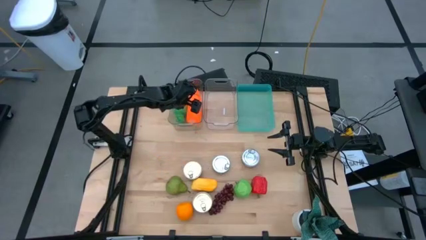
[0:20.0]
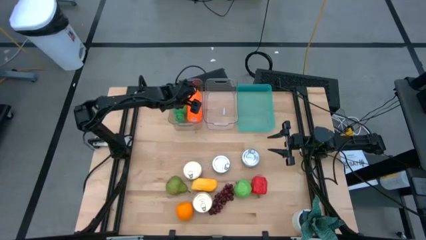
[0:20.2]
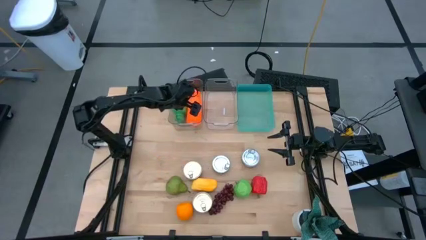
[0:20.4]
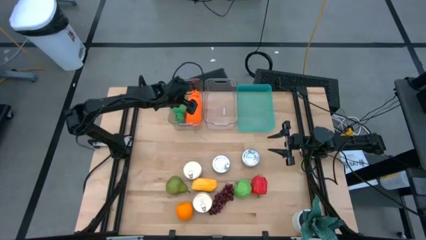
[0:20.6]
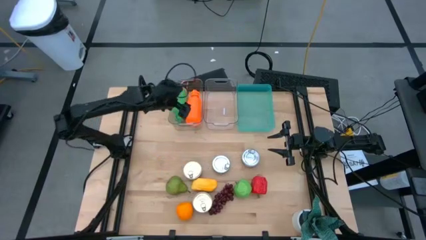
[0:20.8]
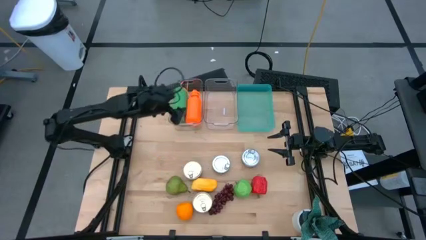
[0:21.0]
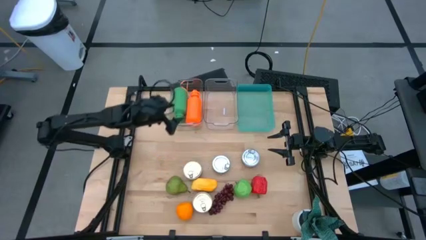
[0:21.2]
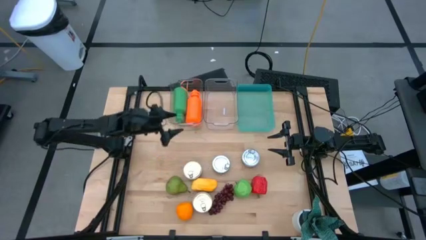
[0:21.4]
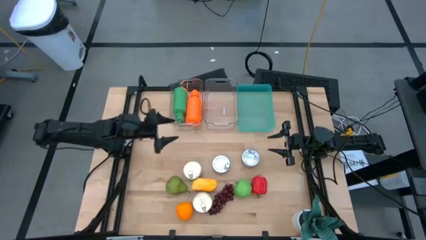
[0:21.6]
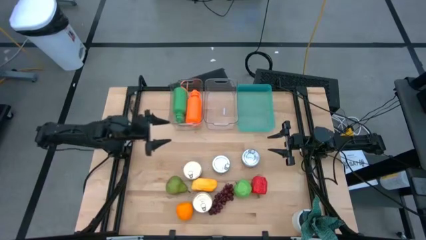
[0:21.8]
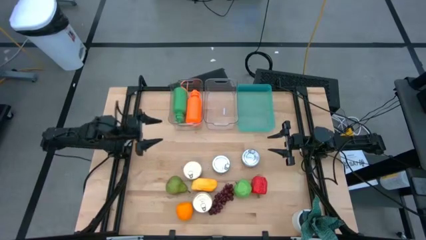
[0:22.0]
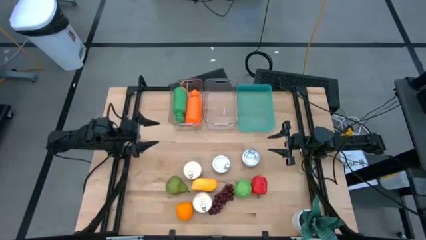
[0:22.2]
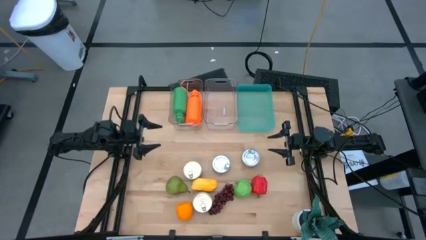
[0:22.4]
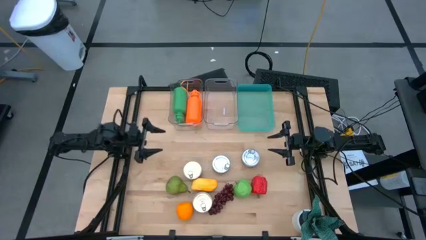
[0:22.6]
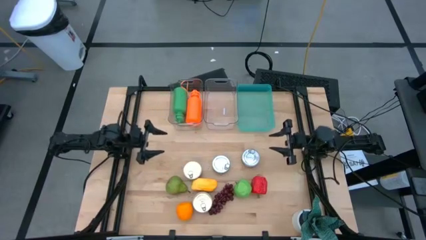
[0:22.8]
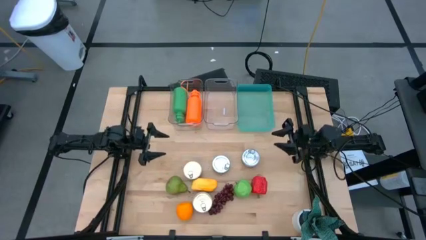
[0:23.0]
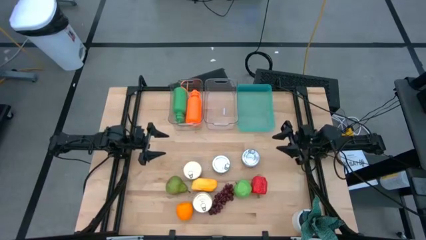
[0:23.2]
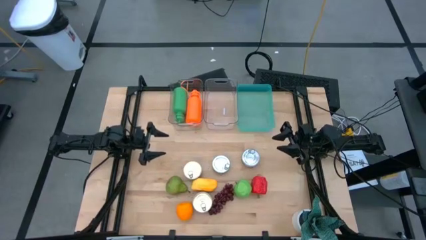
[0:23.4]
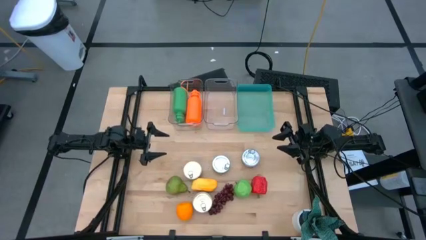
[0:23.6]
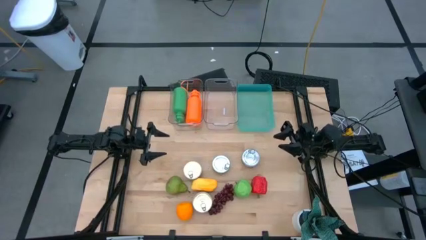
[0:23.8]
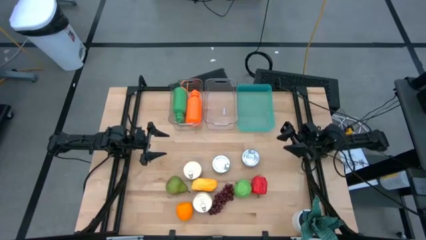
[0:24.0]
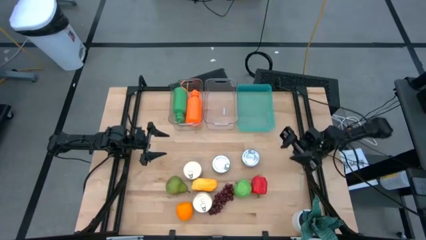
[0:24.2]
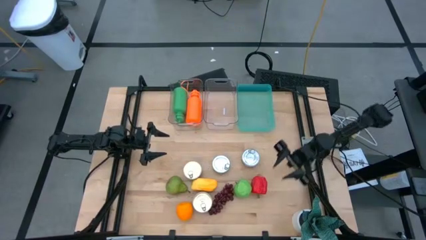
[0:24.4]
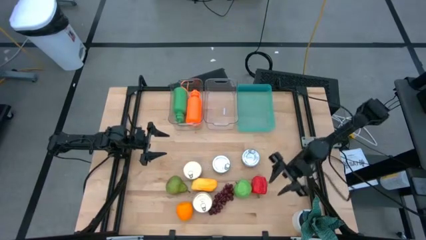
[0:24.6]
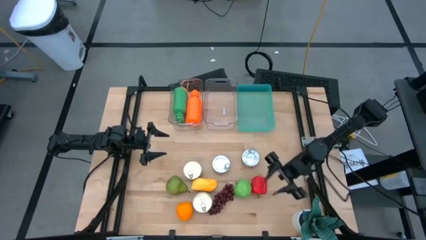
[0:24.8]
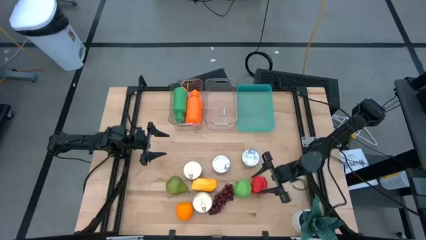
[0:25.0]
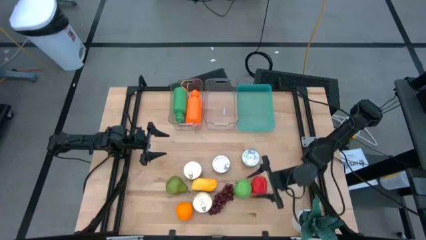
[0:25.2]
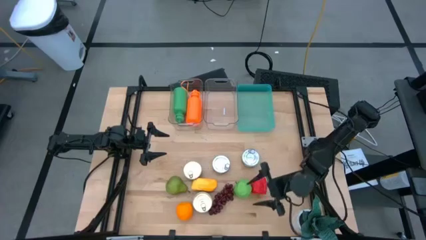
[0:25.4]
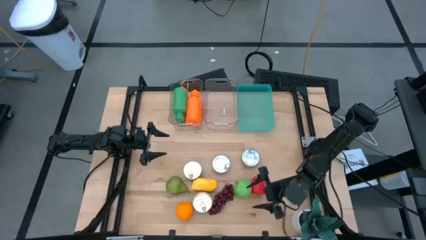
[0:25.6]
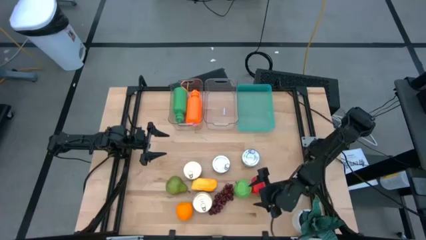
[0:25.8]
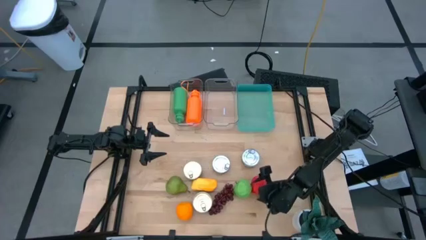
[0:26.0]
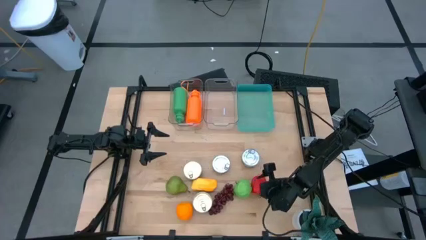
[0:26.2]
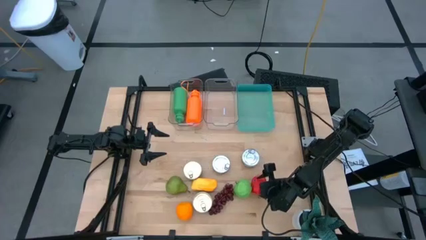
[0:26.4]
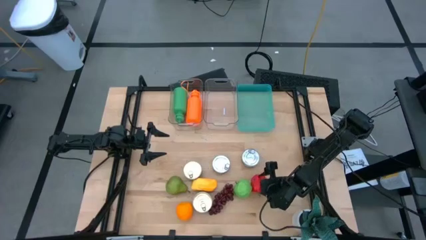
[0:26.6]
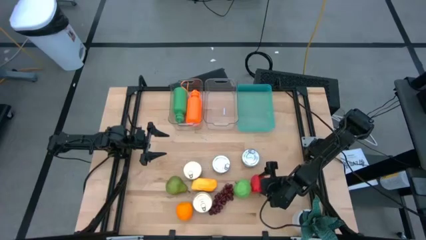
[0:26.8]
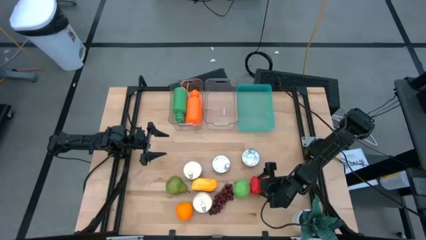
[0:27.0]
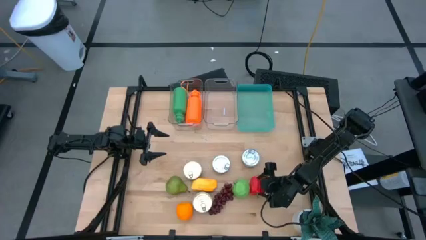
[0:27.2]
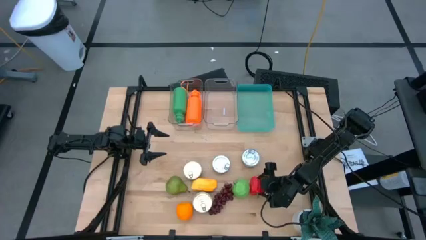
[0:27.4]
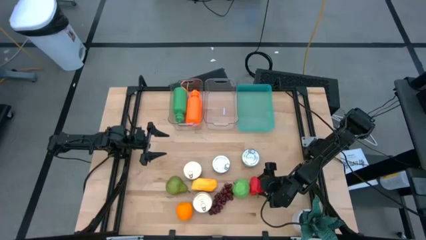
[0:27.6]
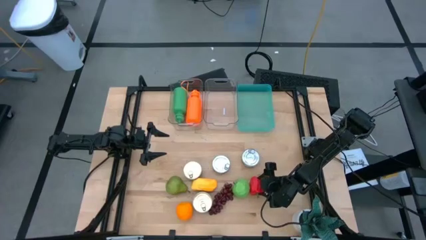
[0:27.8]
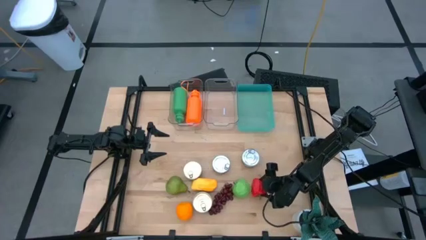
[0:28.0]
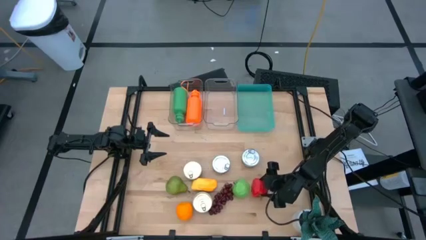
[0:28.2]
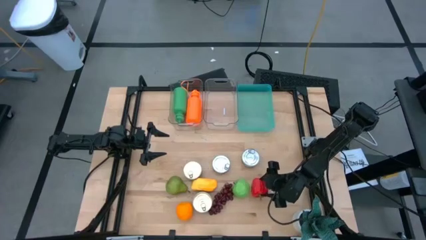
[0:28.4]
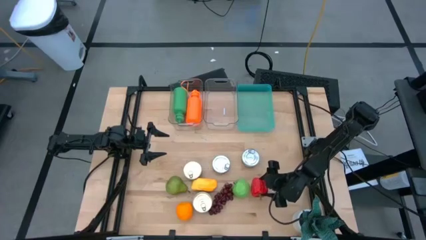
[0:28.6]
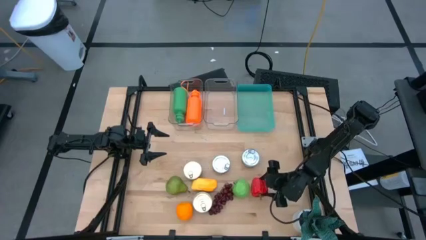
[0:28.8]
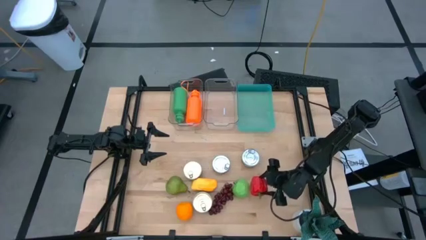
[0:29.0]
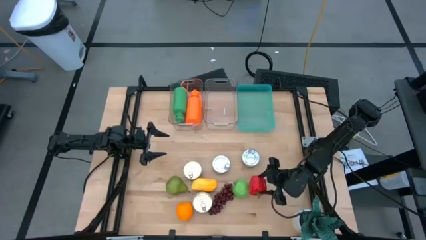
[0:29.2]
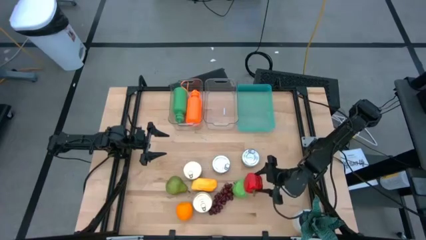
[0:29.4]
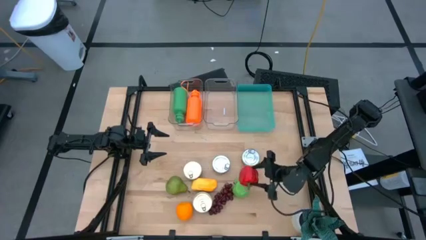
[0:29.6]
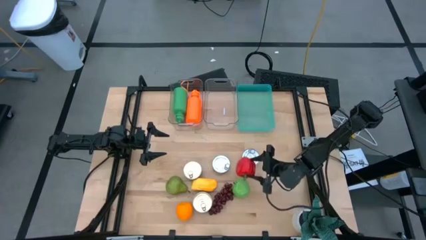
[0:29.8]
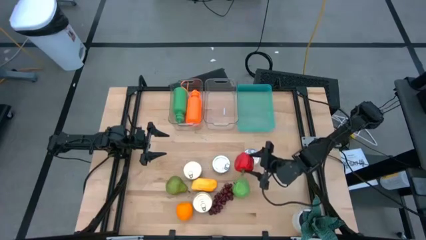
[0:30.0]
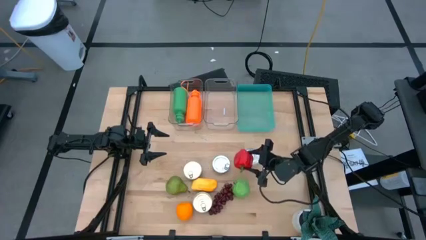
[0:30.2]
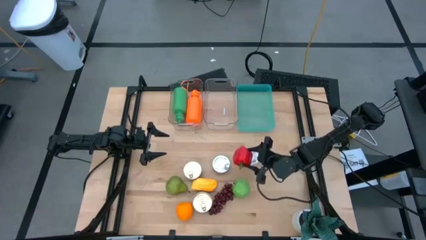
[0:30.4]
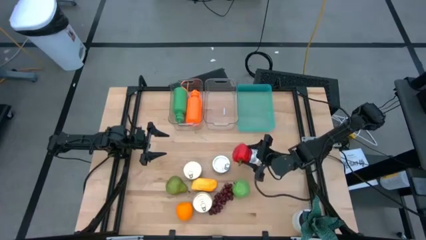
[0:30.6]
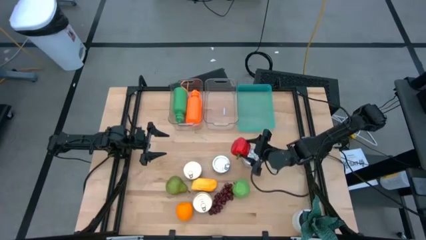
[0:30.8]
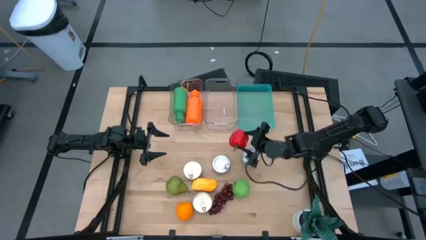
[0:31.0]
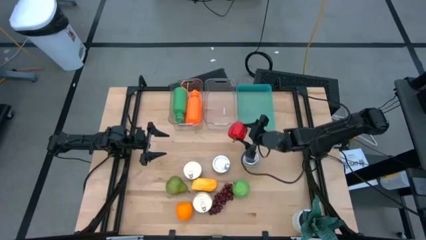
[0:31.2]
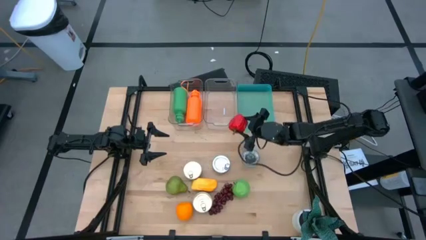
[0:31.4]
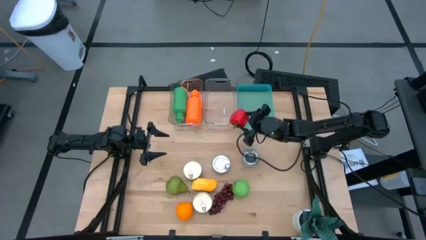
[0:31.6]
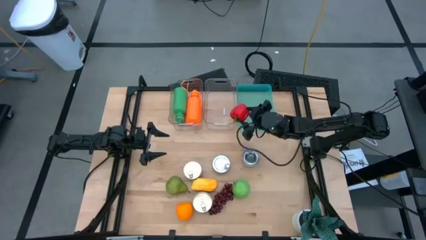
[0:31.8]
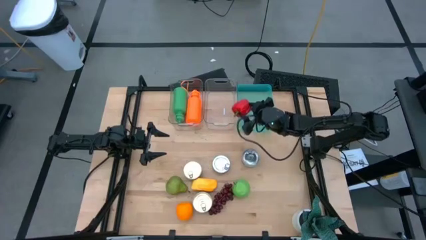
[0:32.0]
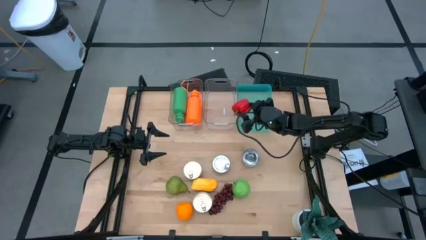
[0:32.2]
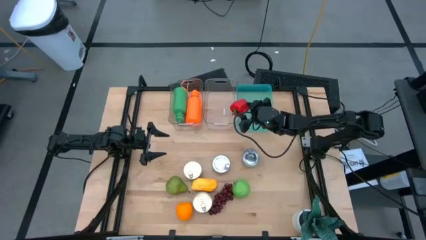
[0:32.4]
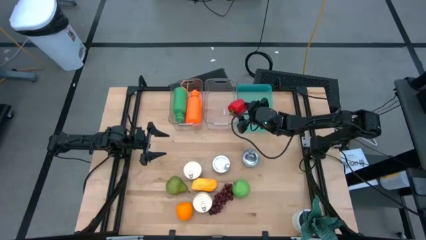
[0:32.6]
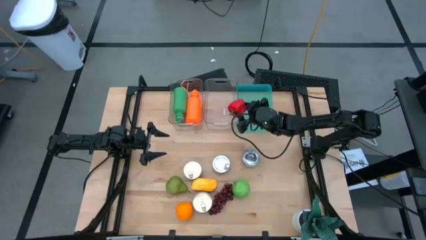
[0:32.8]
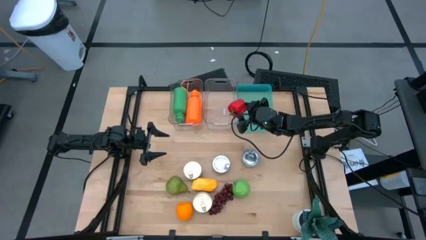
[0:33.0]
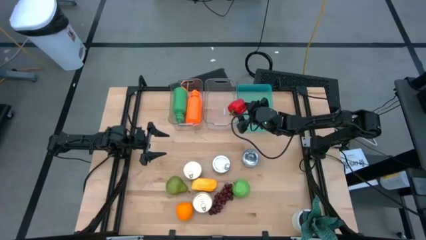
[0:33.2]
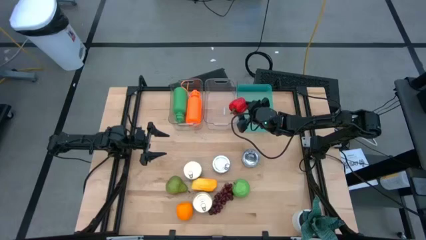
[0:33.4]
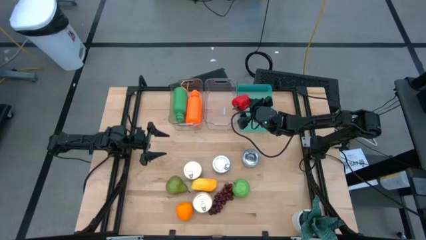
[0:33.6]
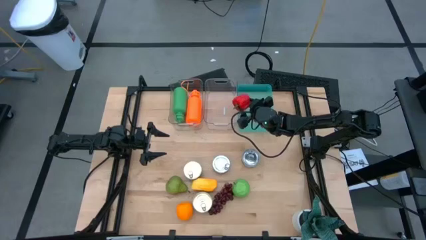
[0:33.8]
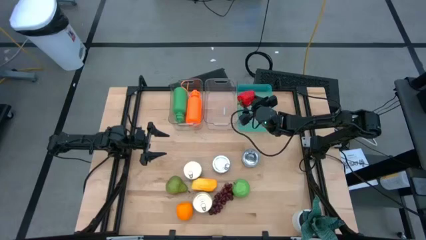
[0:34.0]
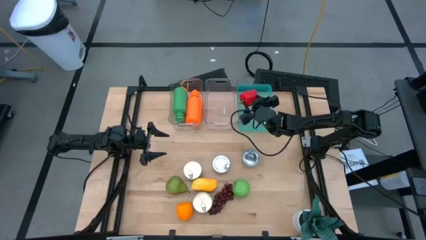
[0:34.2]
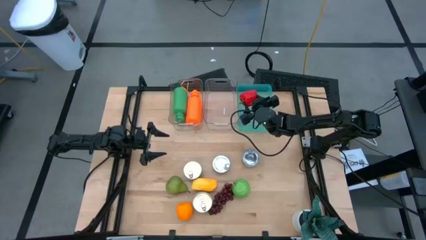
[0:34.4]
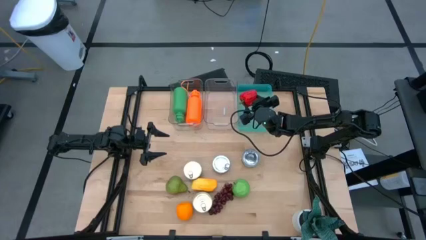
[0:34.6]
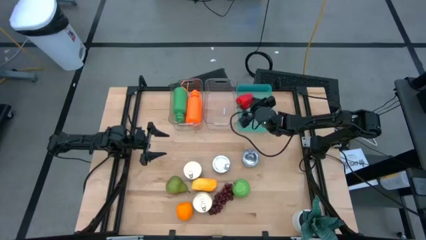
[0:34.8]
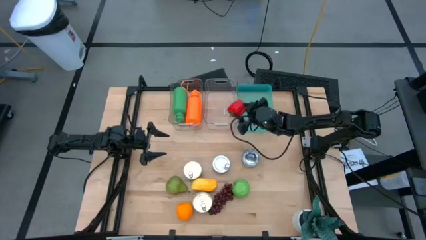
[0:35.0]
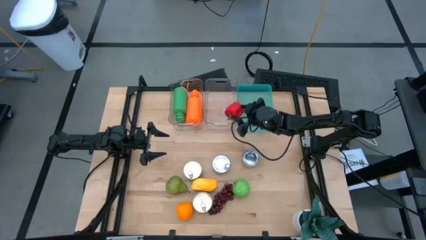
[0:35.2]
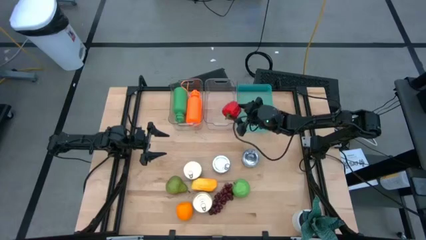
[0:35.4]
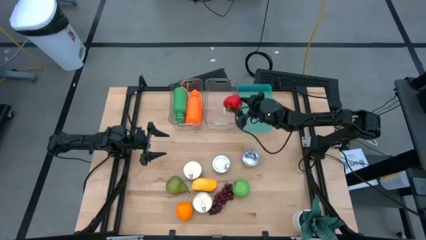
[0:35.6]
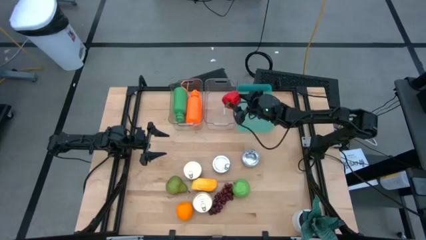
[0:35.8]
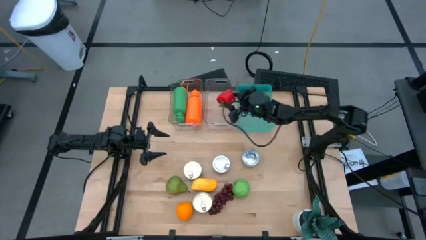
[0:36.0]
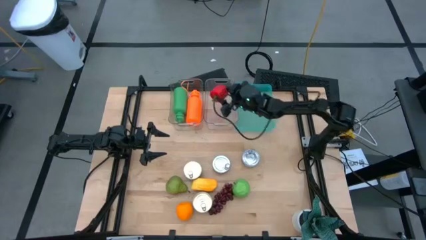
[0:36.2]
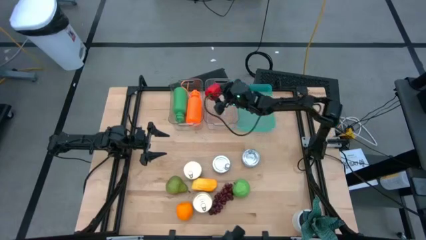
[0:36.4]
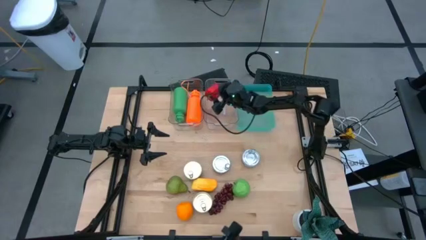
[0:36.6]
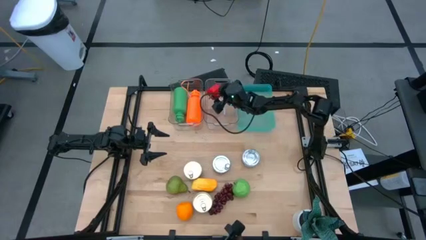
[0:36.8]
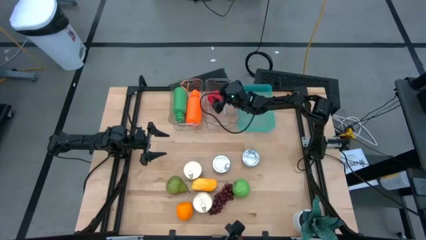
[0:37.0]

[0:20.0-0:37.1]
Task: Pick & Place Food Item
Put the bell pepper into the right transparent bin
